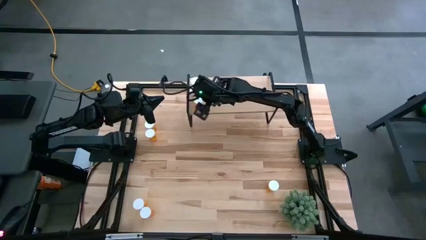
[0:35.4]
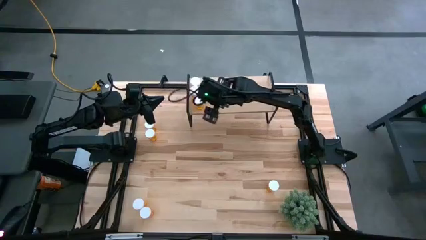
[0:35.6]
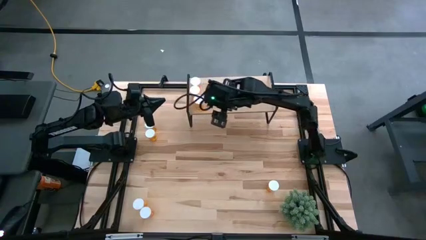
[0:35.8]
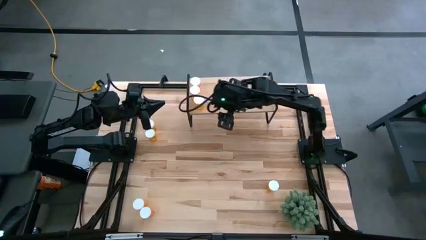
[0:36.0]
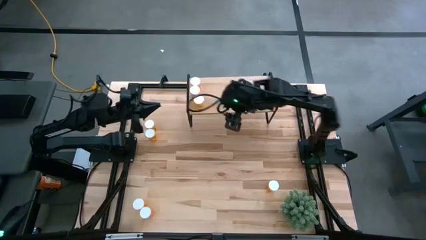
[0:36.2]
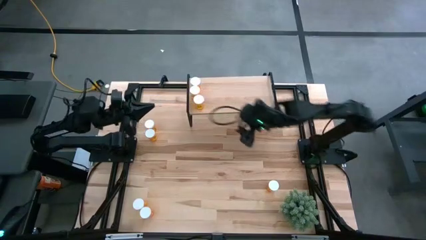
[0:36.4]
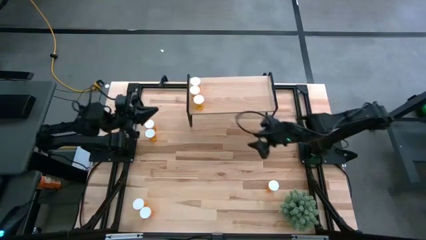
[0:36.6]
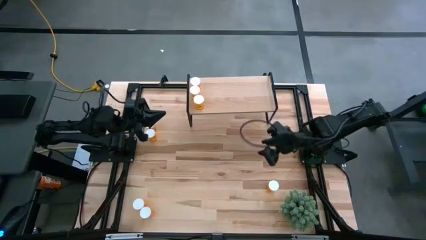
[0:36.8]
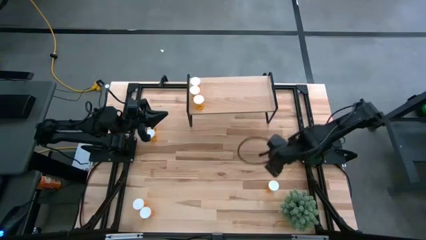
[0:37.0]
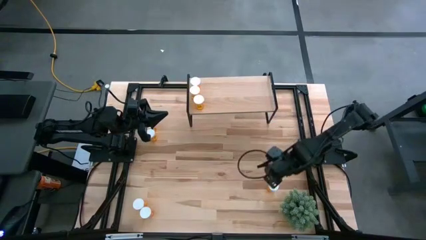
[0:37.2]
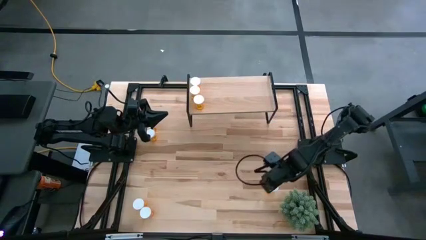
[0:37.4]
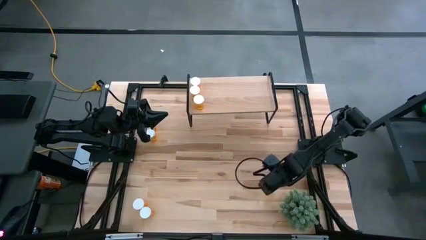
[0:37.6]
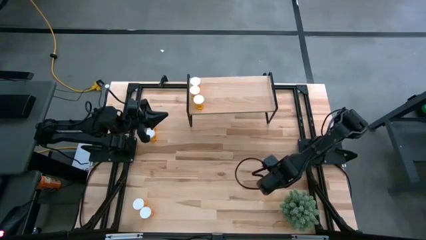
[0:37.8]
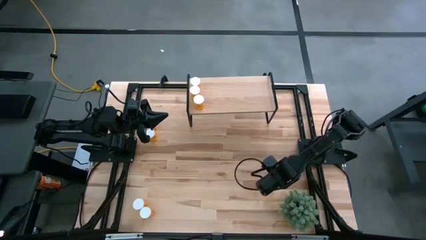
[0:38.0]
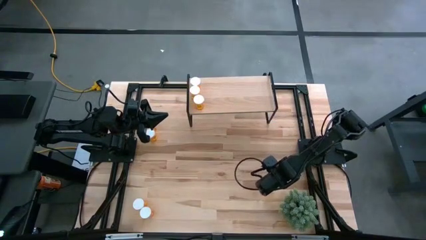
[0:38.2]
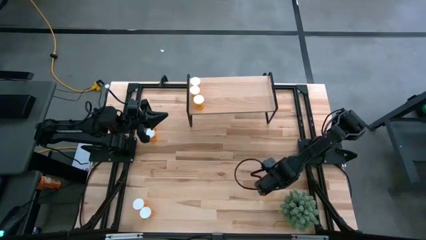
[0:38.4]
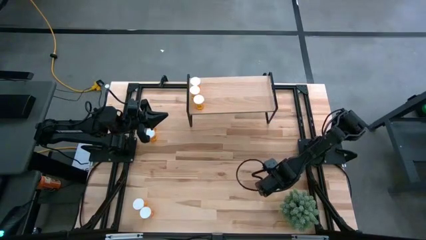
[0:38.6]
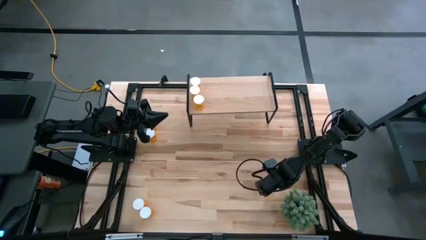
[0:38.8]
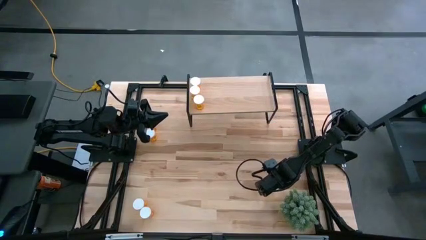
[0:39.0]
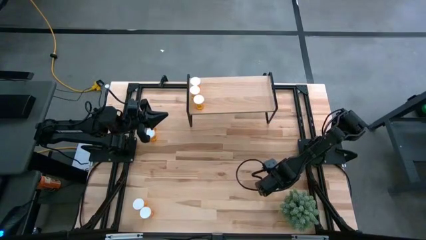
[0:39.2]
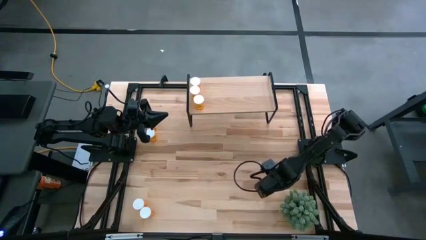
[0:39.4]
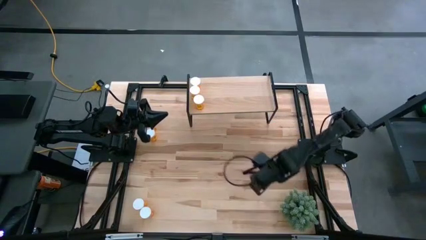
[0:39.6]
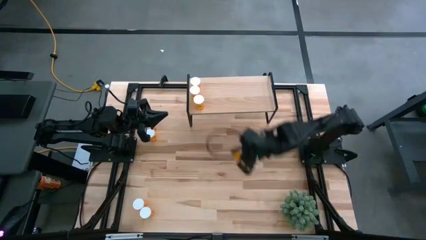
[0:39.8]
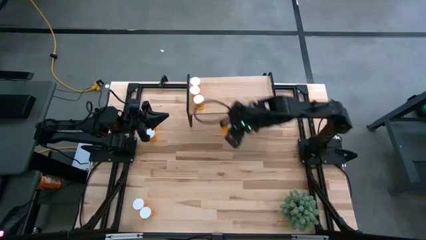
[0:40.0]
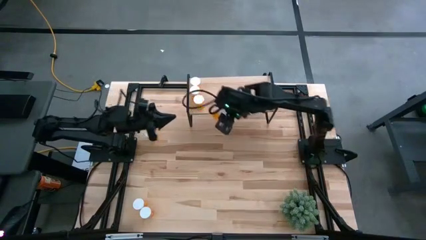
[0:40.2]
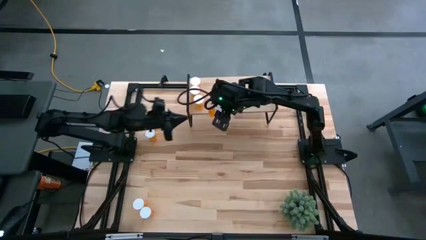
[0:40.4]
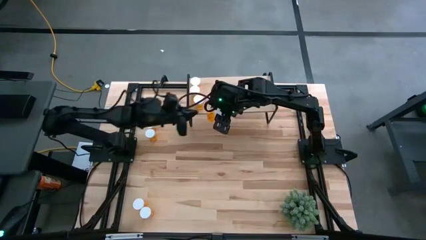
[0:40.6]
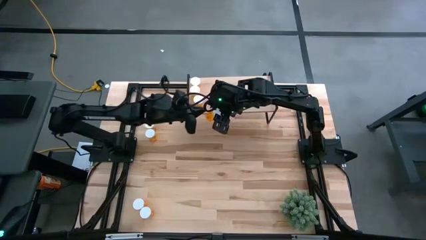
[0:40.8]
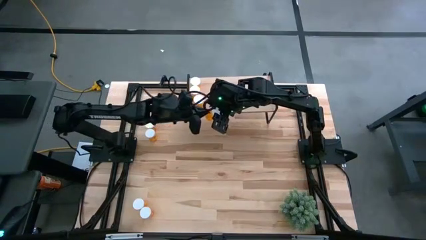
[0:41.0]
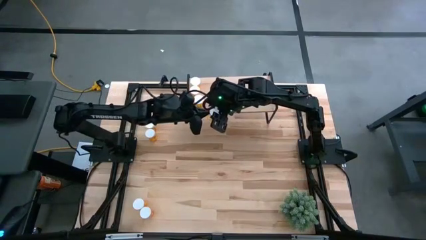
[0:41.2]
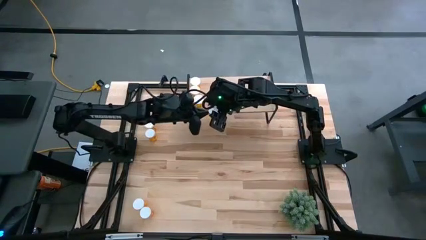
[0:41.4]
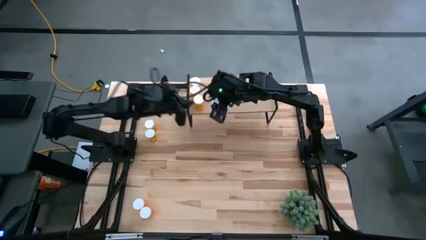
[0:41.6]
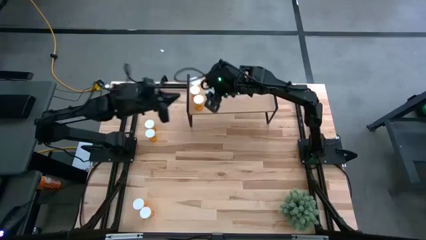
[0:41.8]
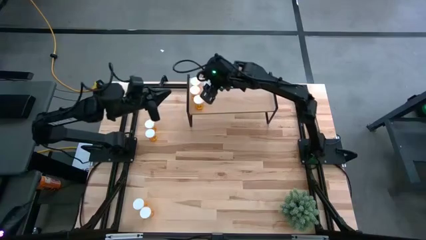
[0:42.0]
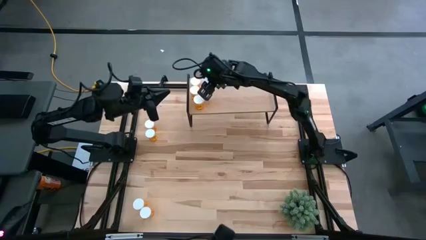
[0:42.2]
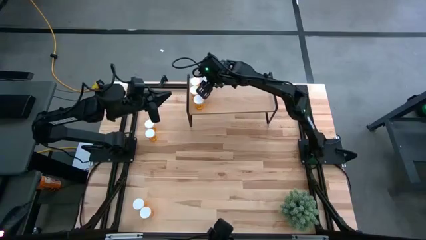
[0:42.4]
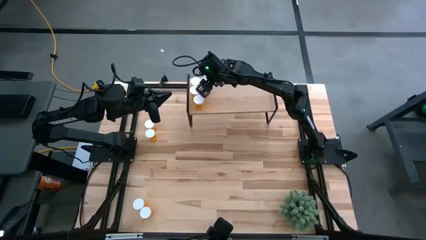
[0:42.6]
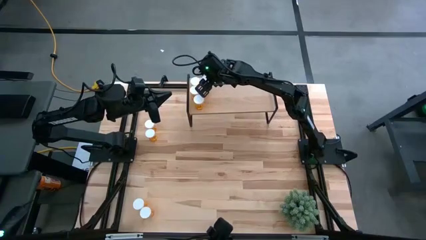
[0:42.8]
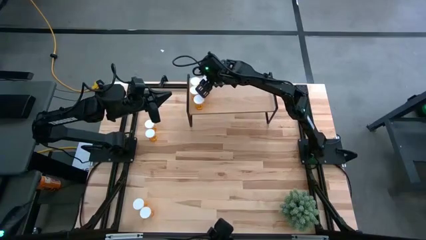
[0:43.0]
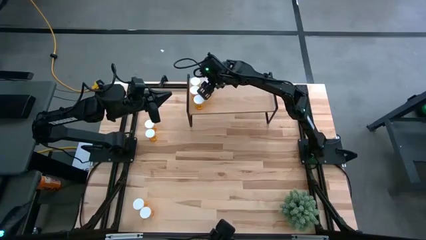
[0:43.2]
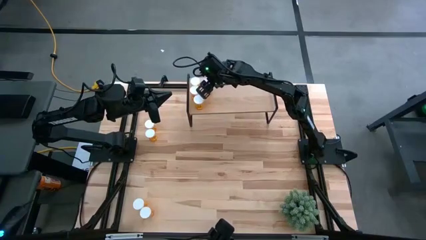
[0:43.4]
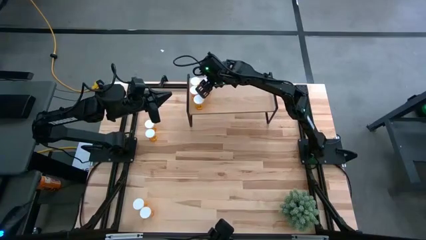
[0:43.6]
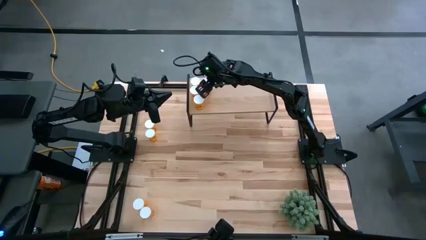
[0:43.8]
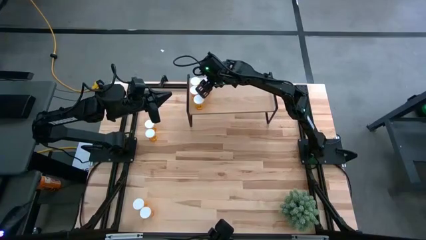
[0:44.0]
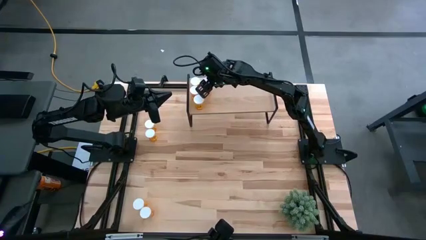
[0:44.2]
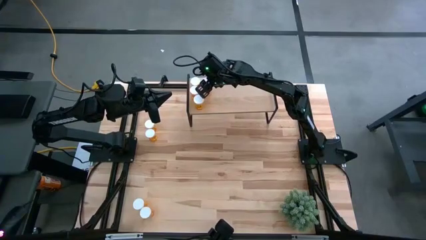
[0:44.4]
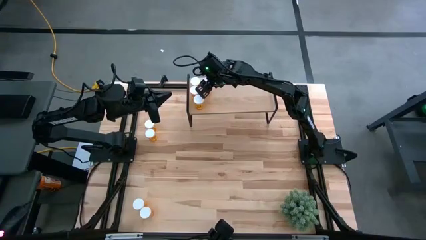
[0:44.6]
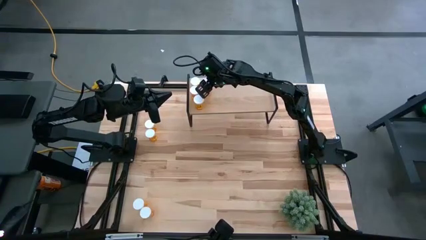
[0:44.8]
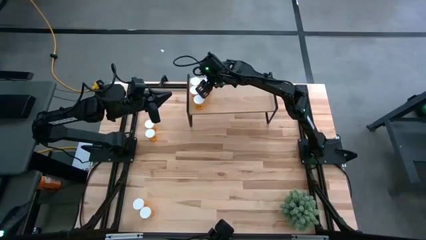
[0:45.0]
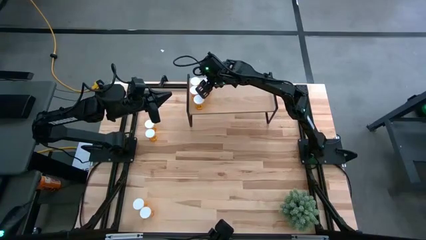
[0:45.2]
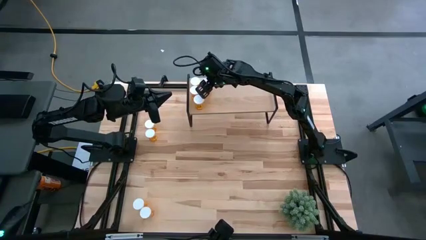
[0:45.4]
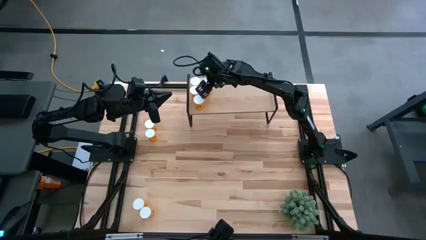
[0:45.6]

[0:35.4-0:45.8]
Task: Pick and place medicine bottles onto shelf by color
Put the orange pill bottle on the shelf

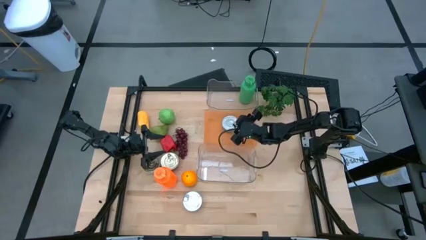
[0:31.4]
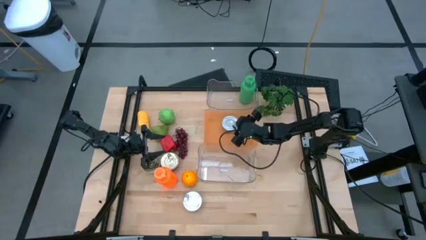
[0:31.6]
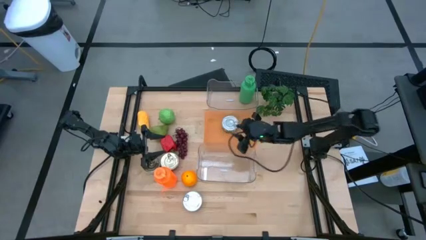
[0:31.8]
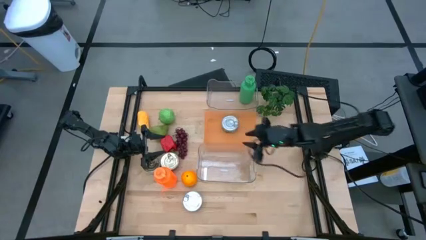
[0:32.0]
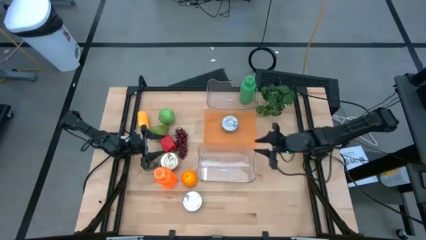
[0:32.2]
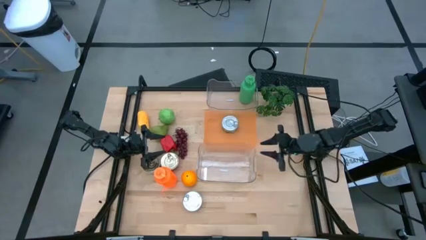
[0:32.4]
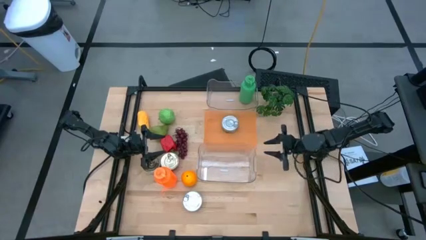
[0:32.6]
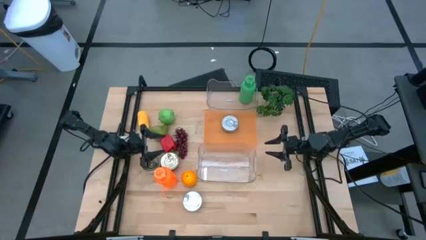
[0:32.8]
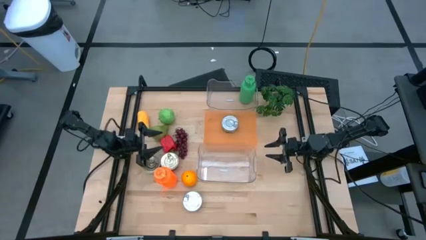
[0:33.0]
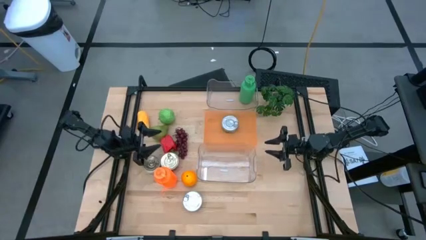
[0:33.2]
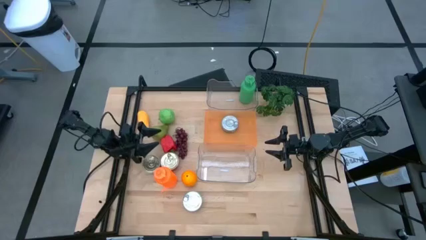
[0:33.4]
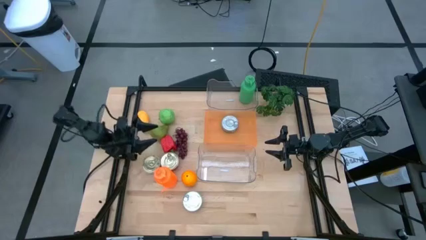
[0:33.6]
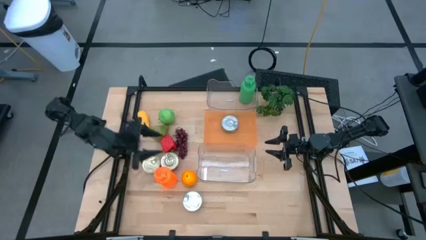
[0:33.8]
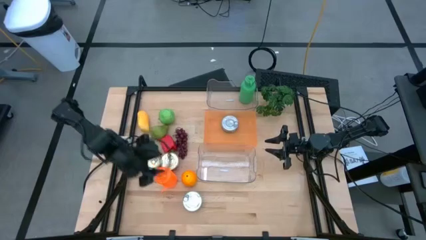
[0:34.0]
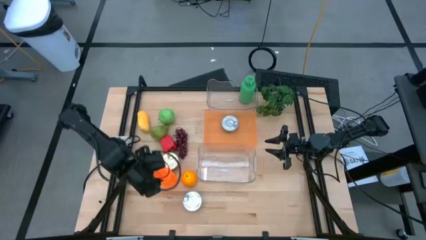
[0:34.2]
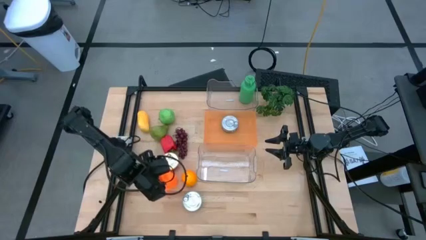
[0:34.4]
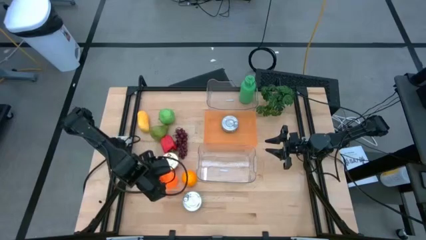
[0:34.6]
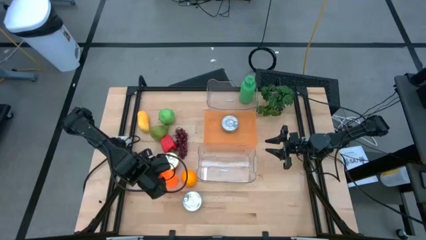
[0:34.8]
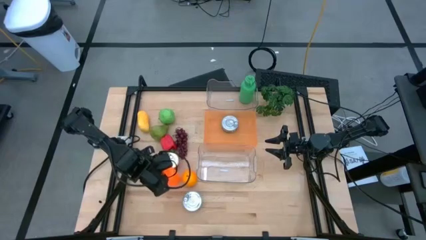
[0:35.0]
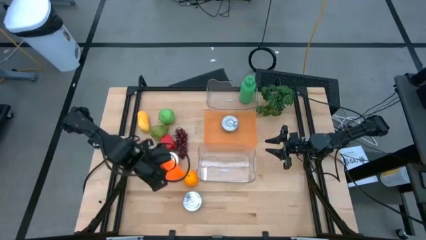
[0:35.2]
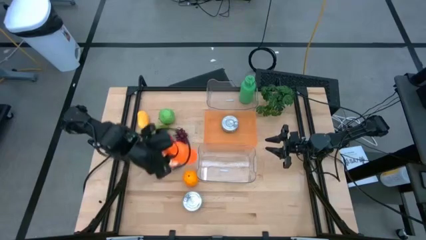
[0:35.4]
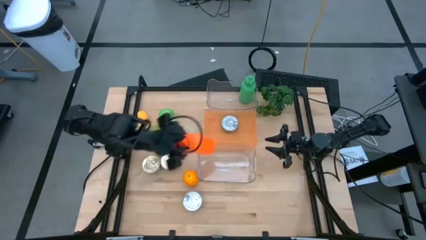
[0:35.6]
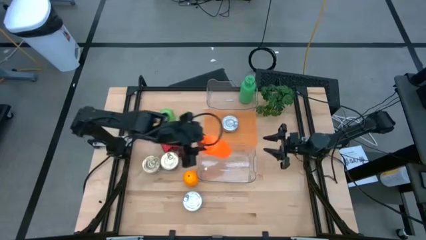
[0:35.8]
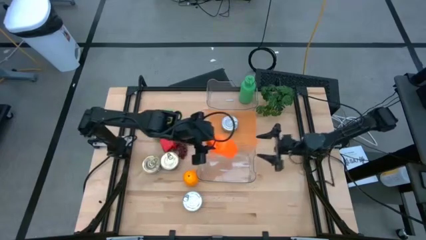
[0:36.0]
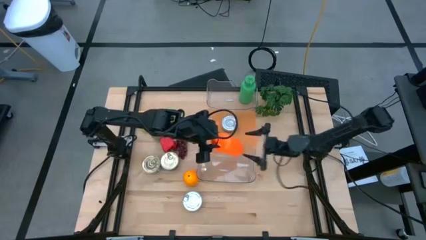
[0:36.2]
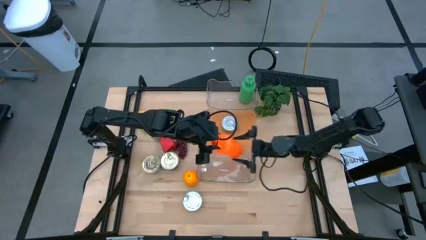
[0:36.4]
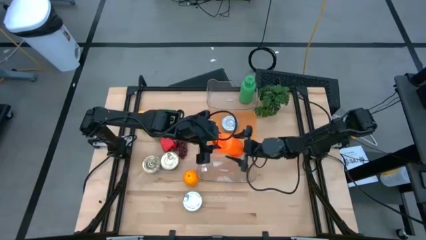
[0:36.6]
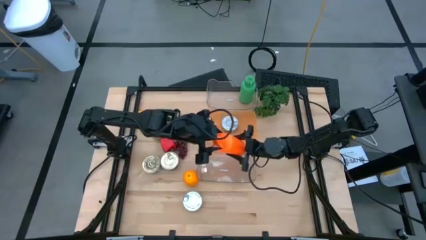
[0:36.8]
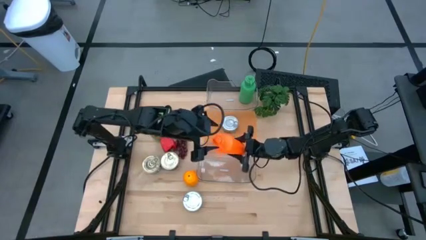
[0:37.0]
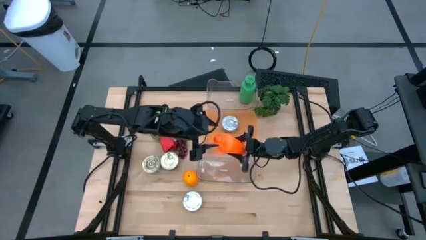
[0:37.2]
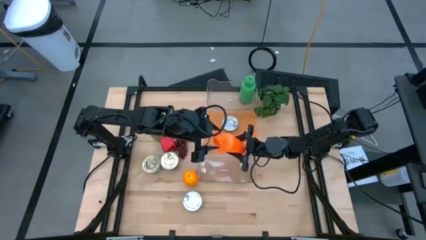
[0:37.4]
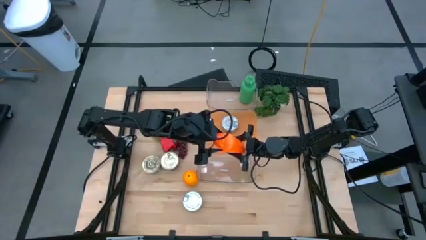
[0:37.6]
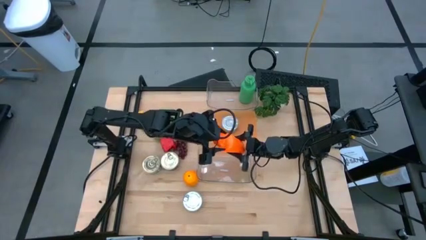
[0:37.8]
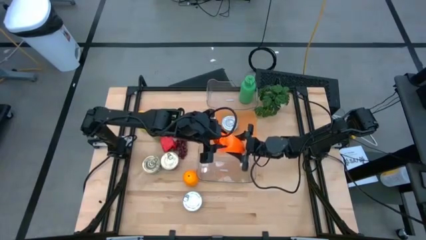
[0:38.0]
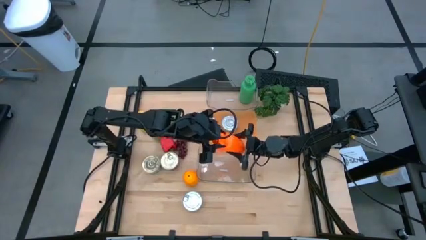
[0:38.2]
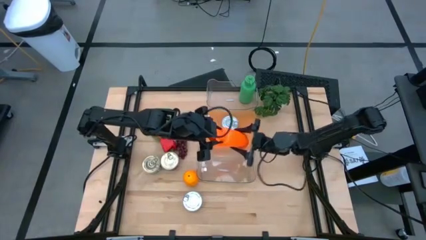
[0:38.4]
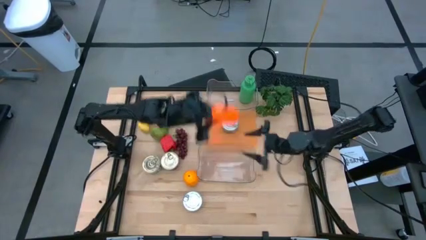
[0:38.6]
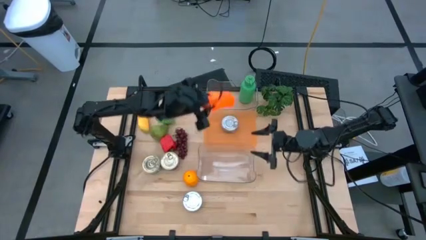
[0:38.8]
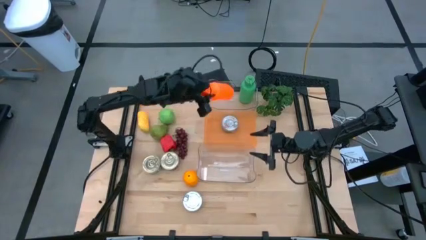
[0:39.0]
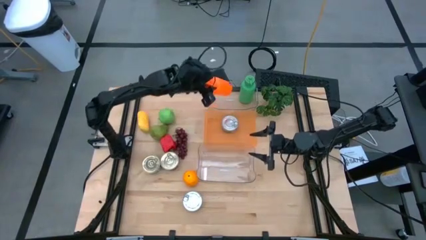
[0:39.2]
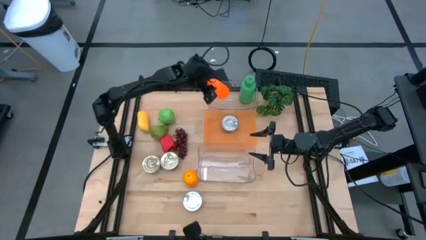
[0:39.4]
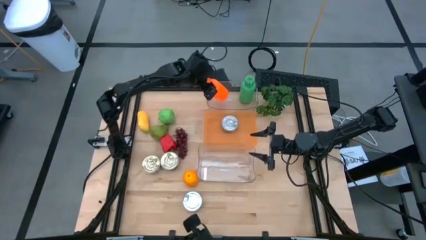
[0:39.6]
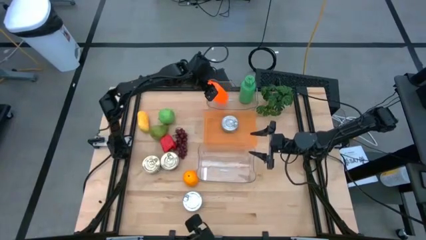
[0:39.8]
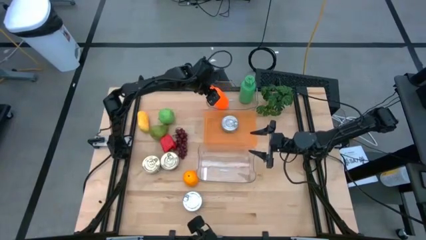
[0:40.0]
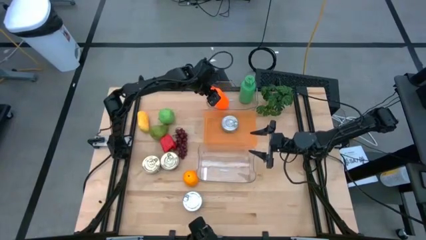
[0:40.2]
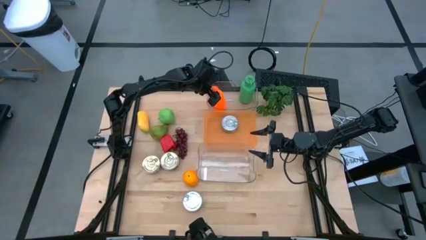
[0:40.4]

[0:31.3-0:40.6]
Task: Pick & Place Food Item
Put the orange tumbler into the top transparent bin
